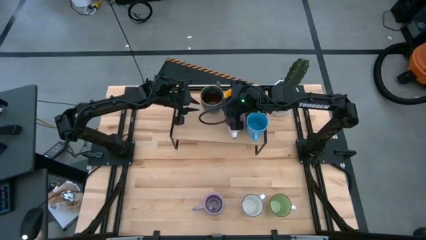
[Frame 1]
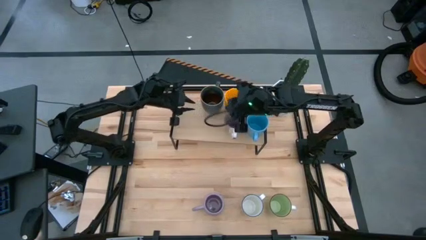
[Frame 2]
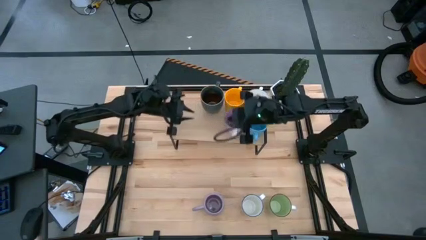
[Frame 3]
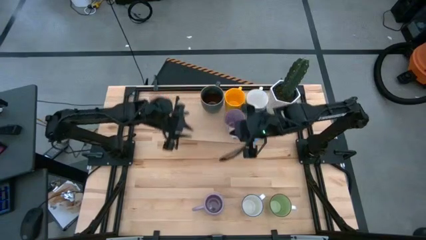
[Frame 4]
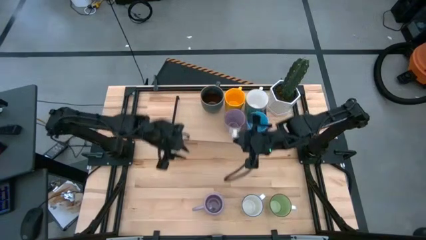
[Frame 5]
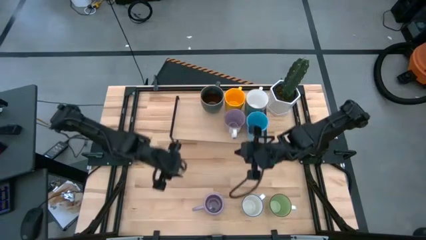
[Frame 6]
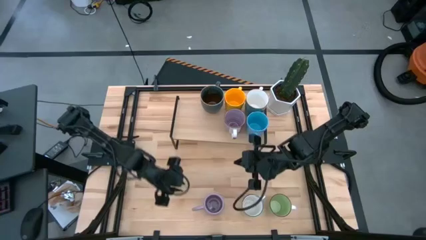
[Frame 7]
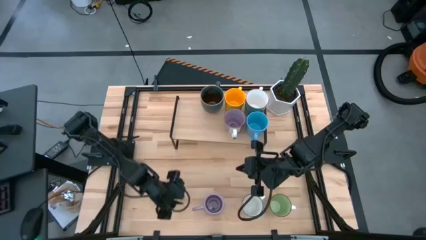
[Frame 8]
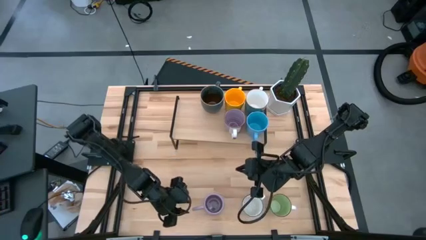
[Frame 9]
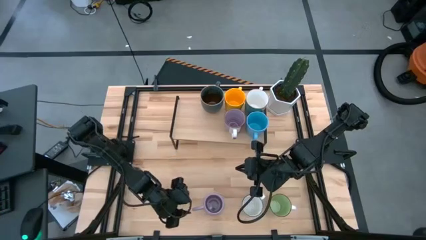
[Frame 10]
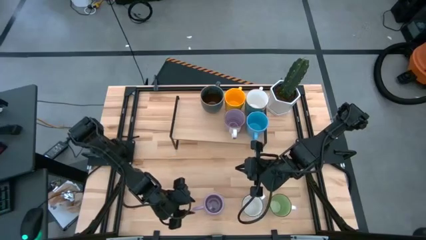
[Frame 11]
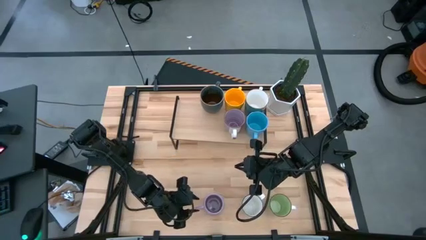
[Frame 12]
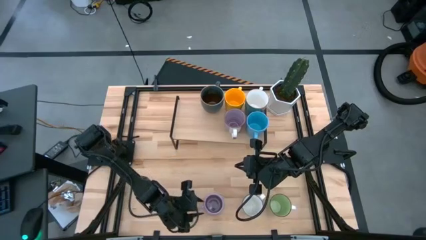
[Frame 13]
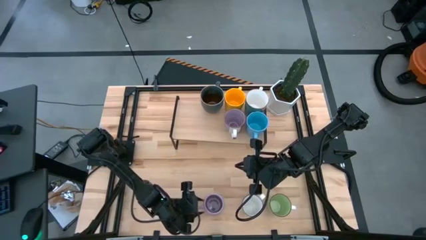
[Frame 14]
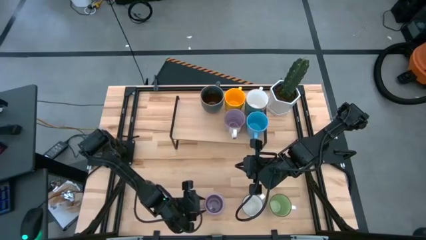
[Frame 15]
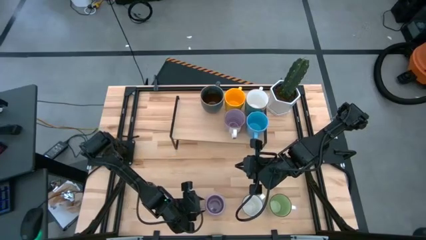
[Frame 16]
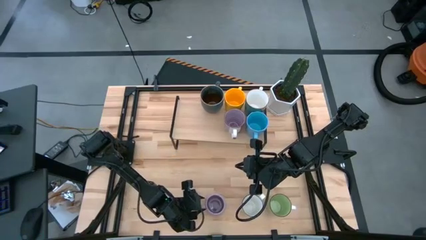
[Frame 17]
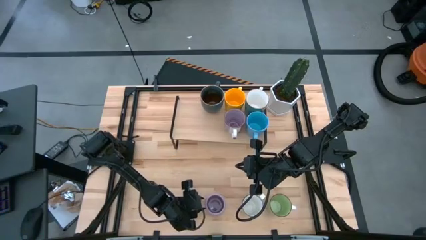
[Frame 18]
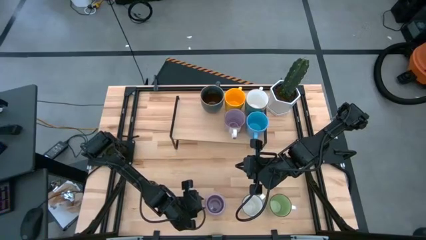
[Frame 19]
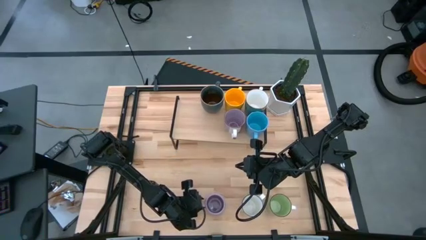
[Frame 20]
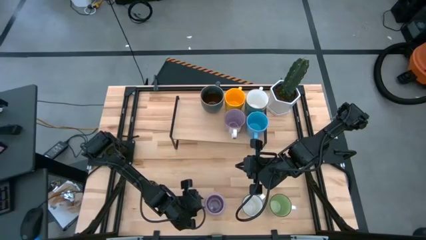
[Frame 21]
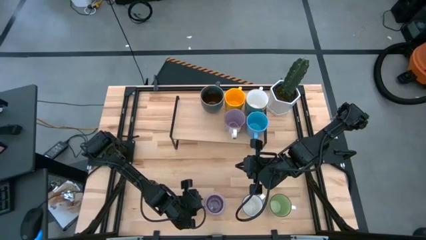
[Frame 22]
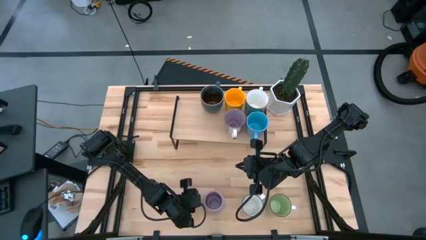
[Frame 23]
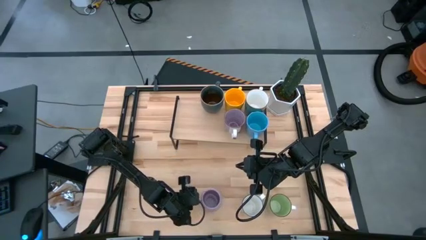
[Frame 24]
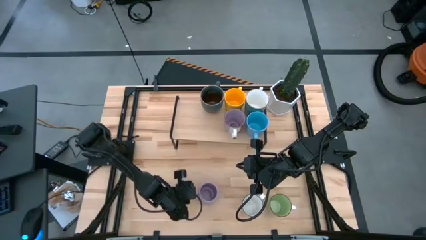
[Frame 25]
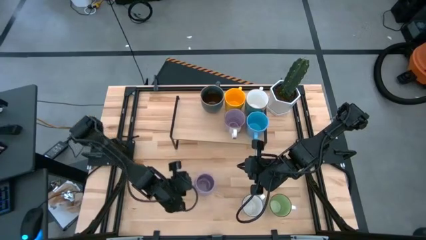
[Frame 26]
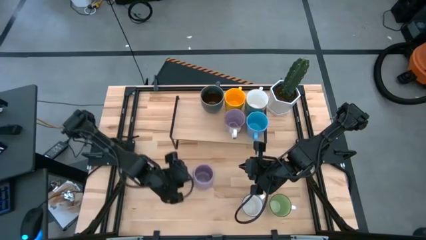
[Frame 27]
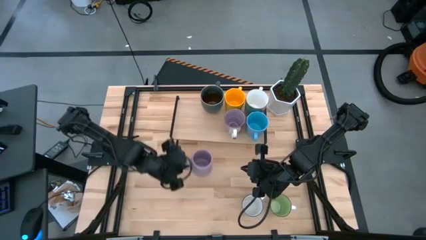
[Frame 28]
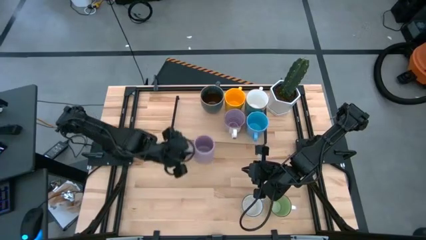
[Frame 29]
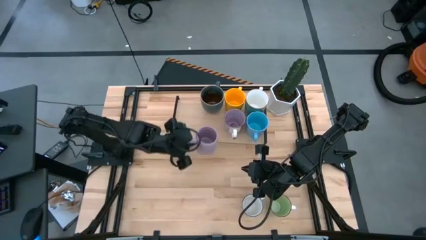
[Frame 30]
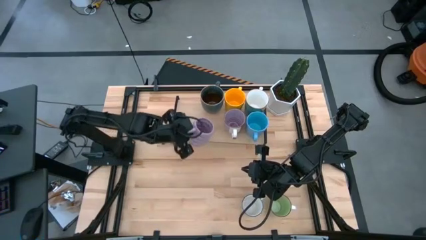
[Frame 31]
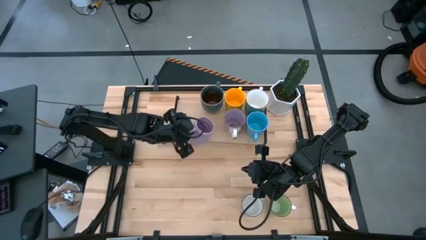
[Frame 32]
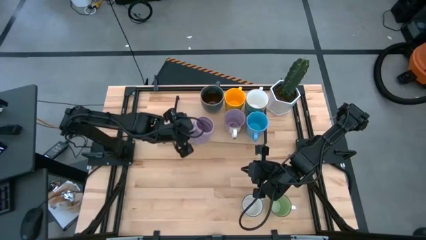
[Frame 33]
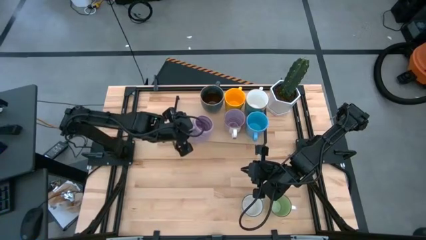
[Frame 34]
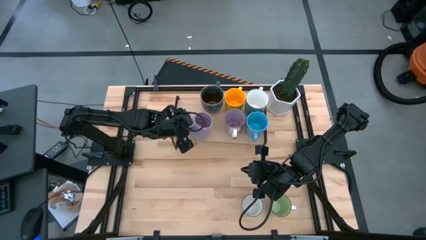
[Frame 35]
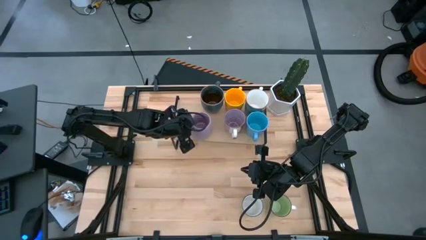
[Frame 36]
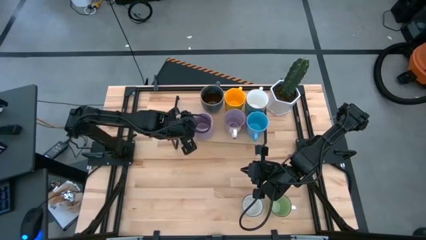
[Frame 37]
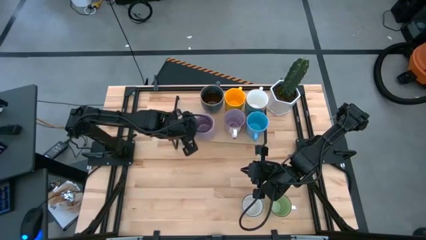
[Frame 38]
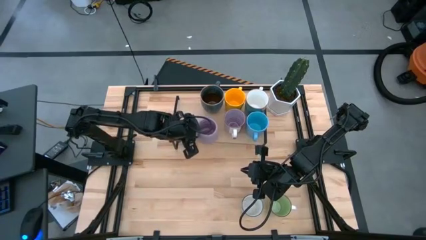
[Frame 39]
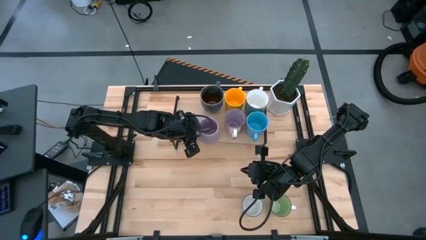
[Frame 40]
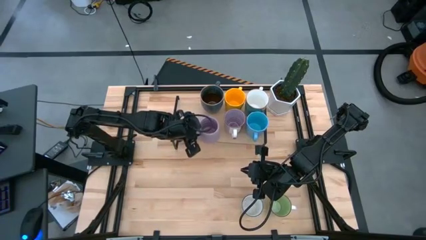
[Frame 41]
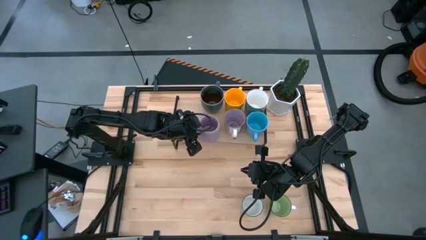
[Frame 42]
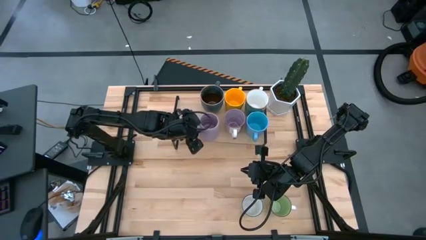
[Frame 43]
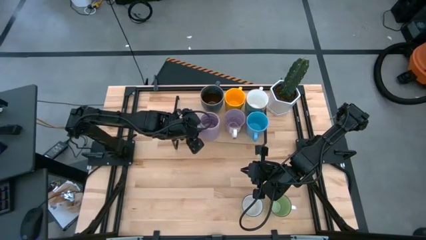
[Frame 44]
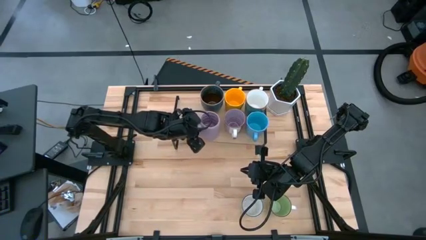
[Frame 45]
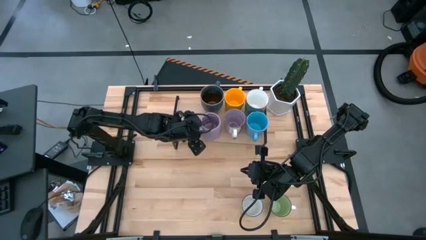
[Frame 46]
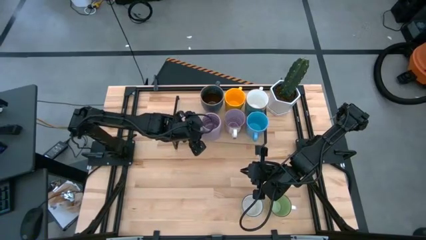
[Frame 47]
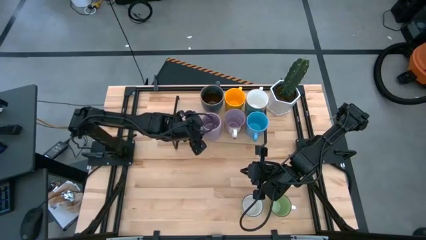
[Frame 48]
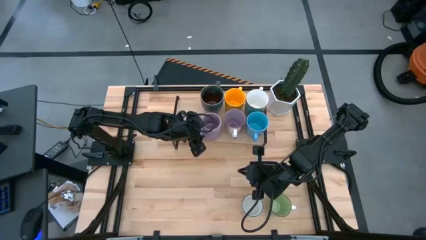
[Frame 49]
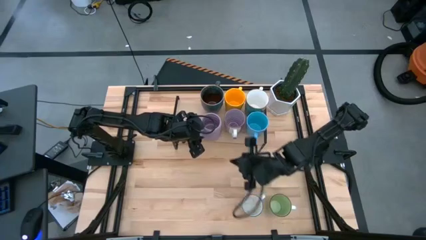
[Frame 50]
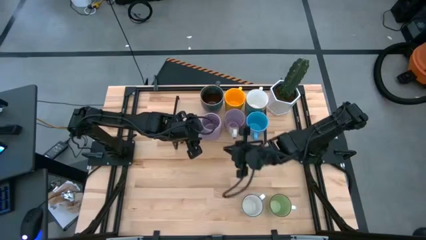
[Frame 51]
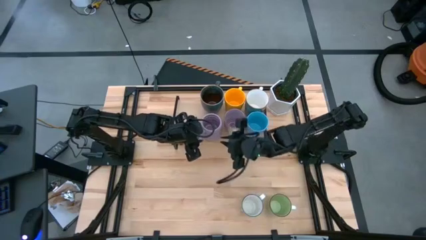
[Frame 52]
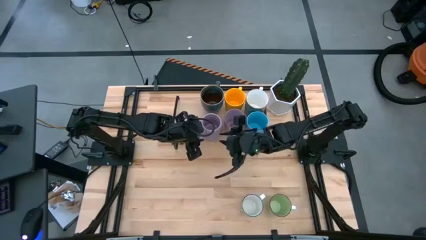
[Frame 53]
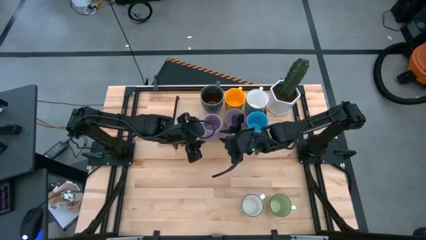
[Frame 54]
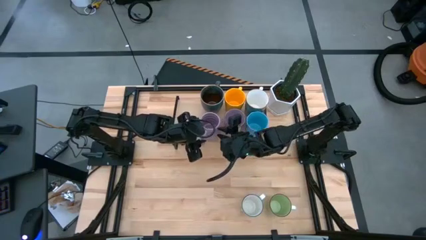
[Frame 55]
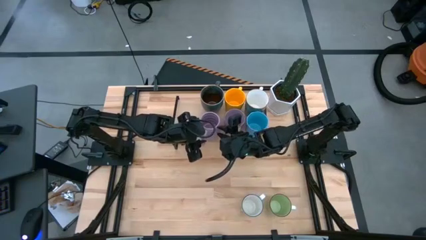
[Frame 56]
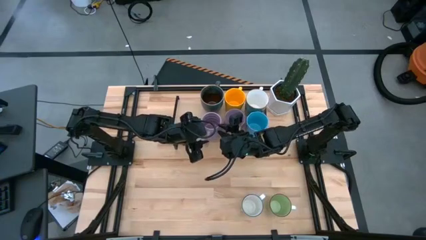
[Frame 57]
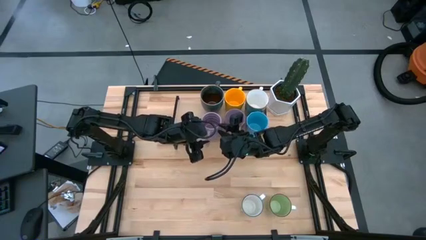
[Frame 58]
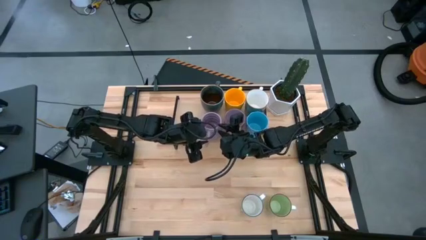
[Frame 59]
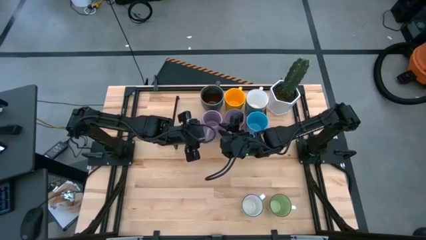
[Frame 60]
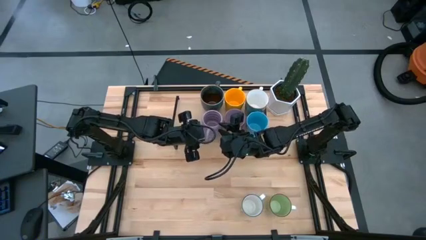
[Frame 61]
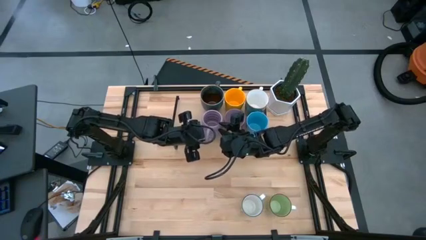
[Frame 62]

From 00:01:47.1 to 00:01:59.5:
Task: Place coffee mugs
Put the purple mug on the shelf
